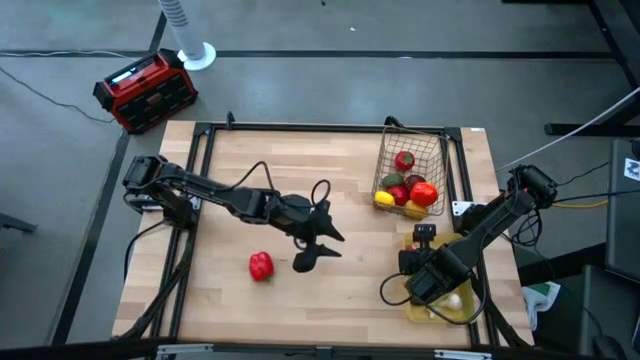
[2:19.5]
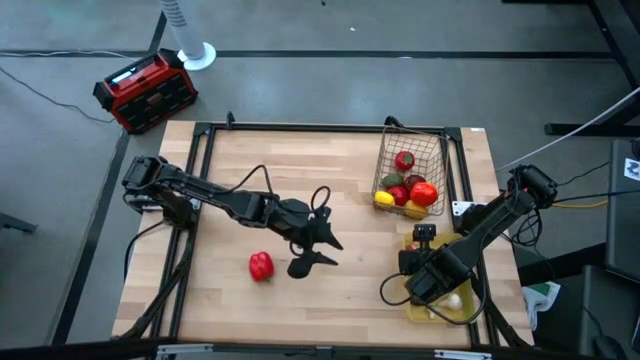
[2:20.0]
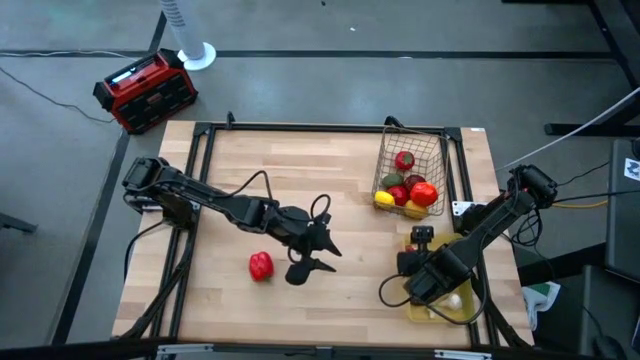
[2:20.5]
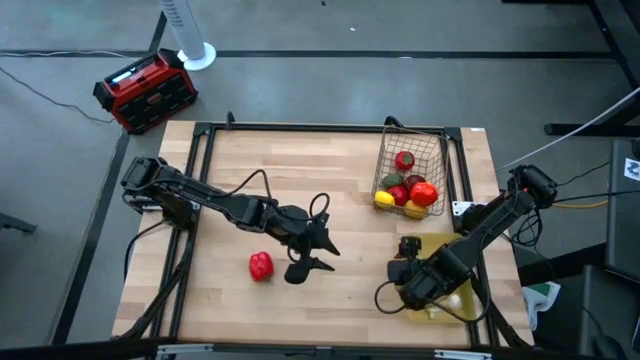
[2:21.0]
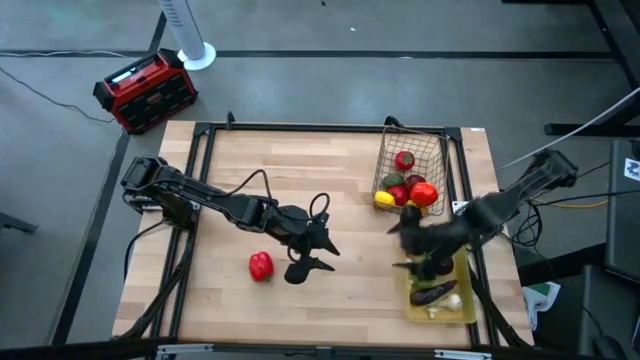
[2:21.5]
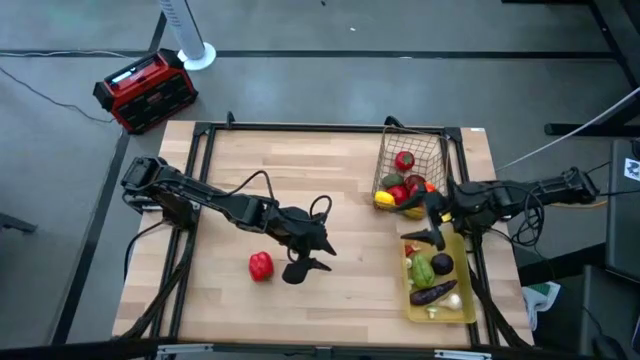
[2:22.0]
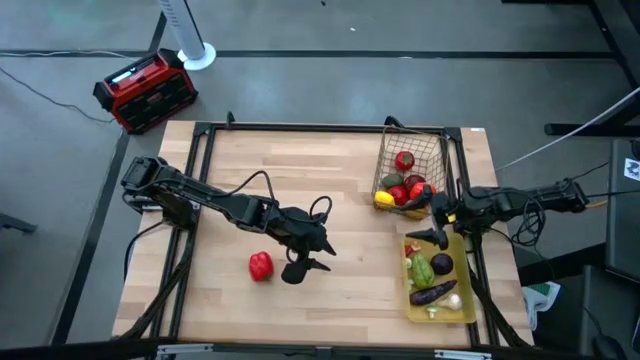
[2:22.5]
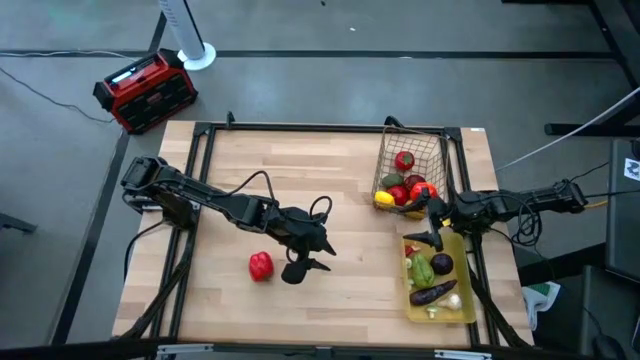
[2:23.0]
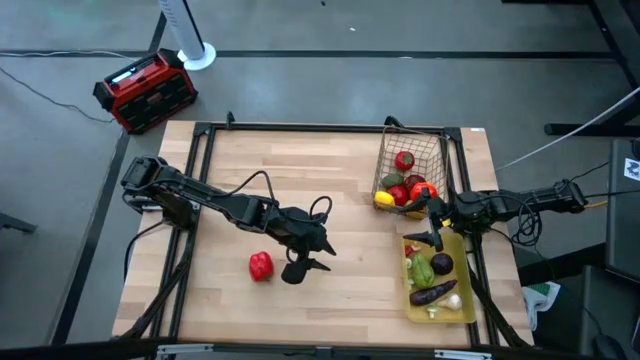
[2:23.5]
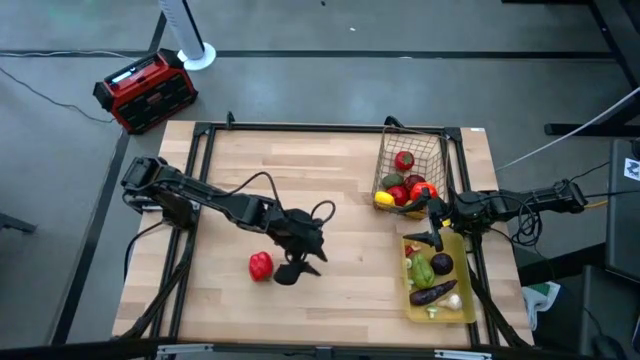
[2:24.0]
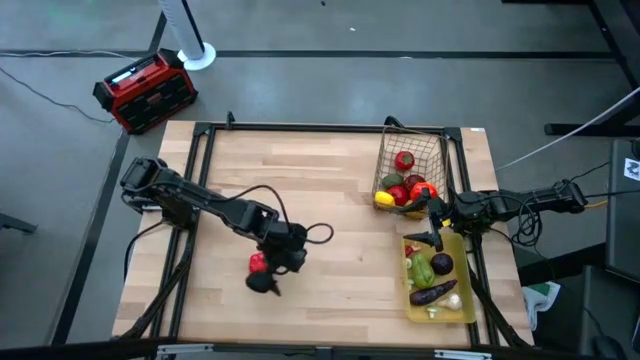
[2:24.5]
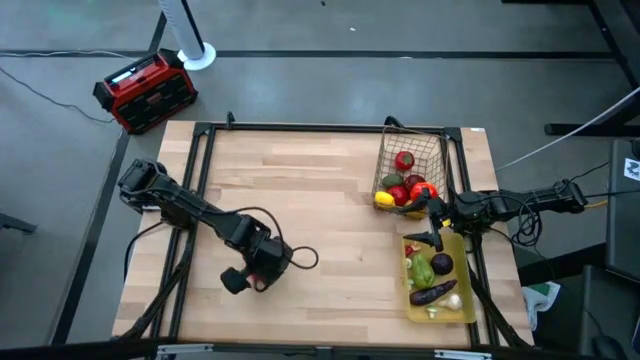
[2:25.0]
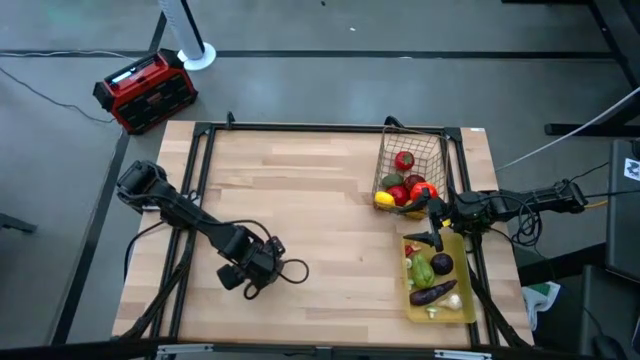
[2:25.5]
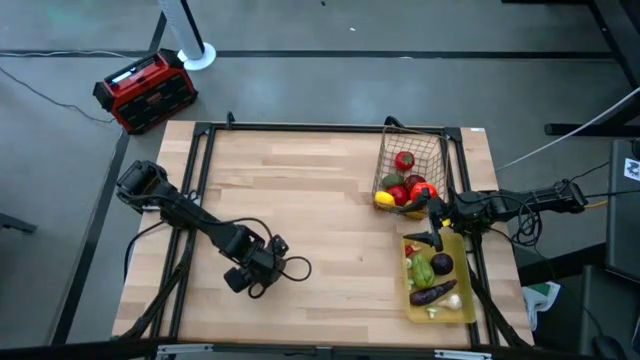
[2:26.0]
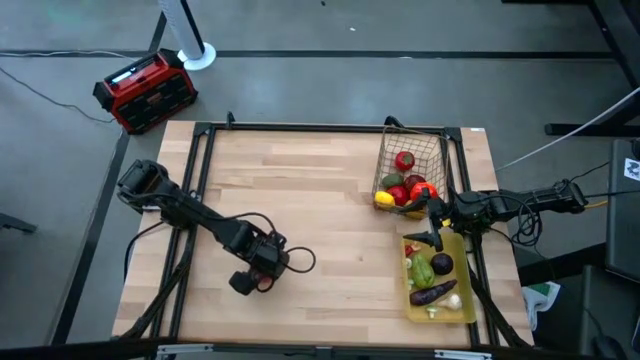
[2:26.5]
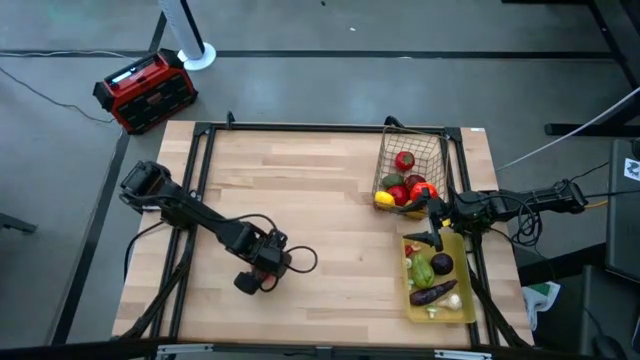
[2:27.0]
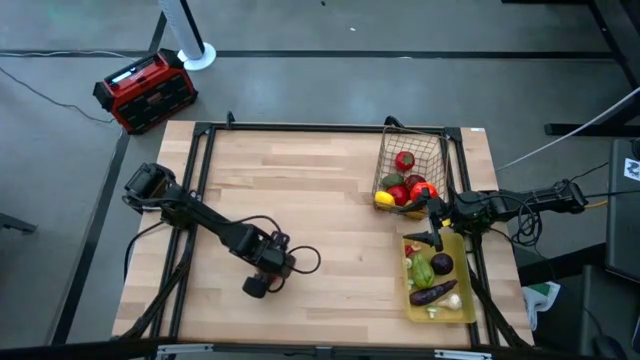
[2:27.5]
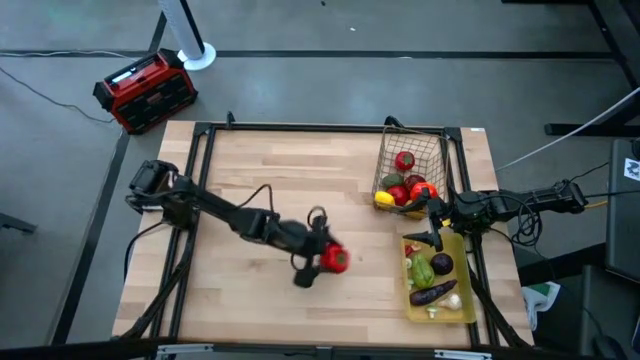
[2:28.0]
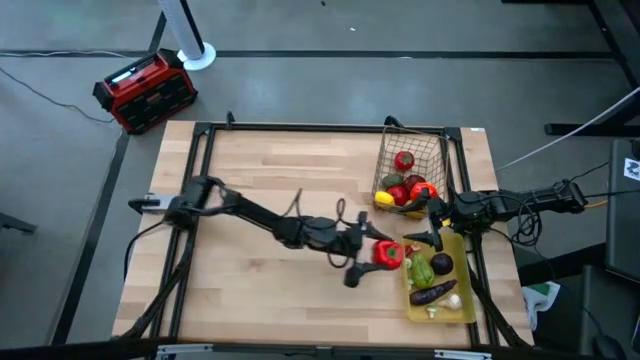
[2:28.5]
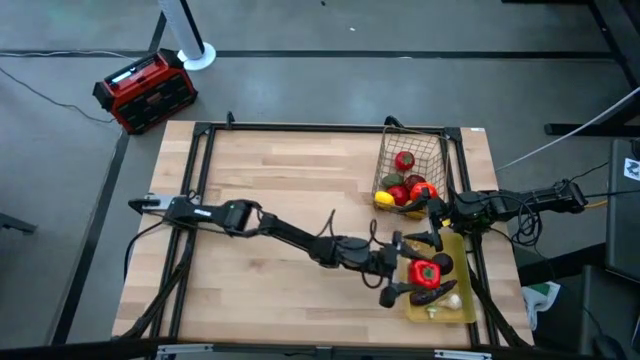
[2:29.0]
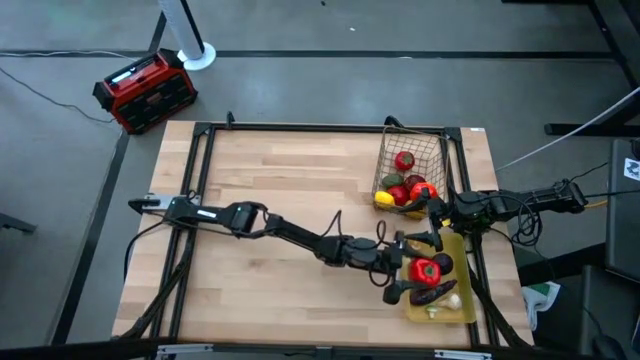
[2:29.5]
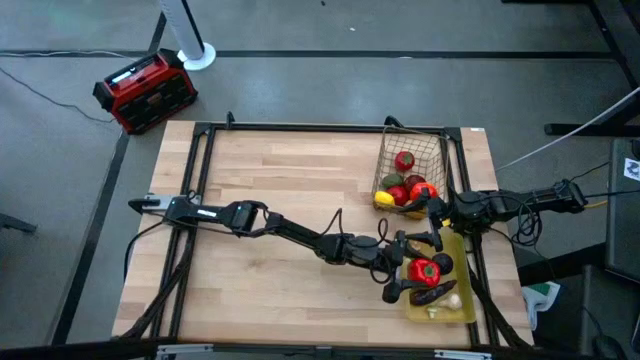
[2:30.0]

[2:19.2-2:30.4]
Task: Sort produce into baskets
Put the red bell pepper into the yellow bin

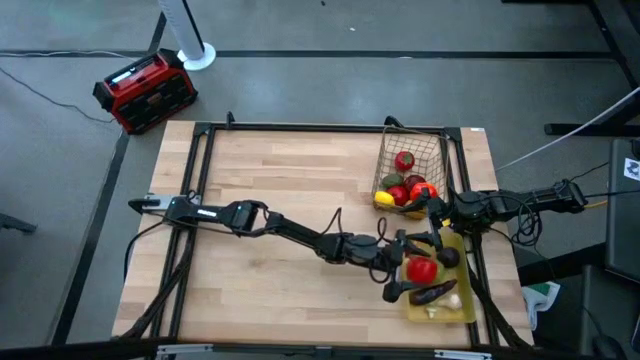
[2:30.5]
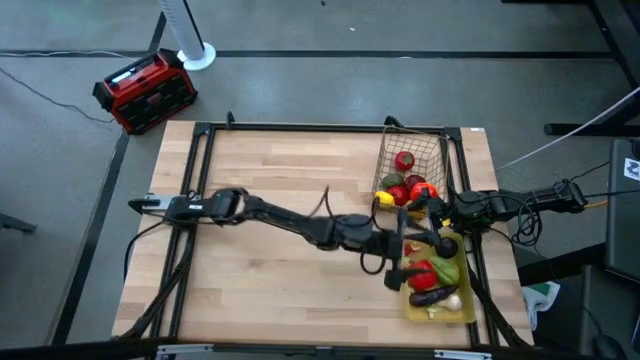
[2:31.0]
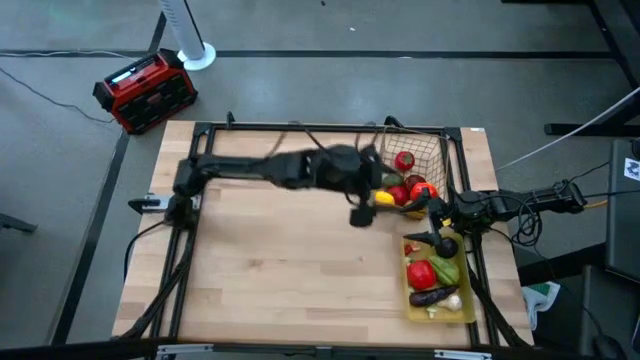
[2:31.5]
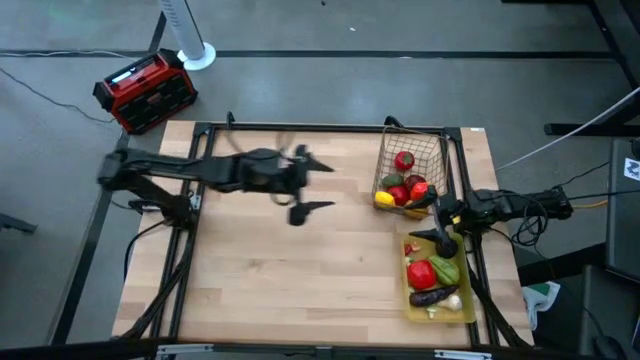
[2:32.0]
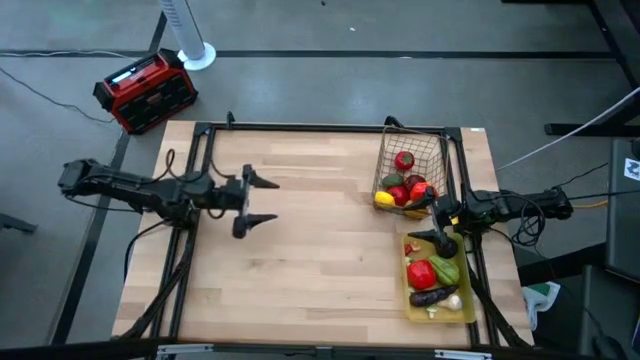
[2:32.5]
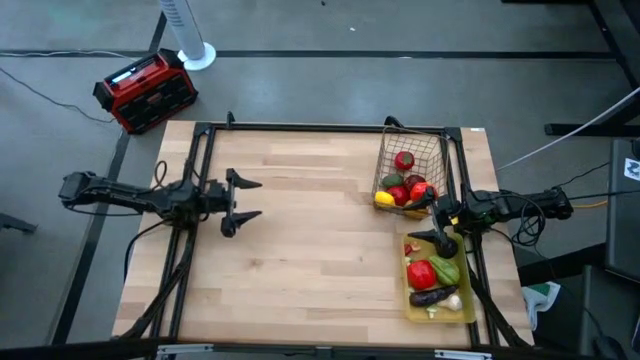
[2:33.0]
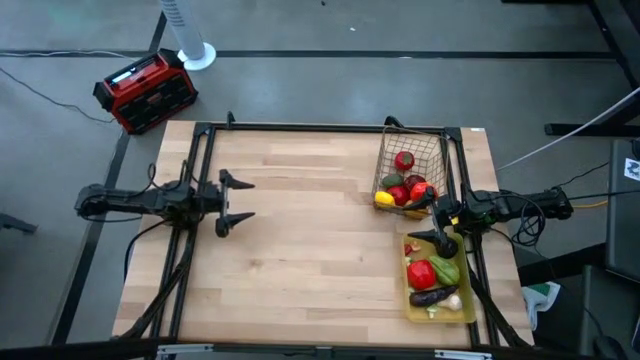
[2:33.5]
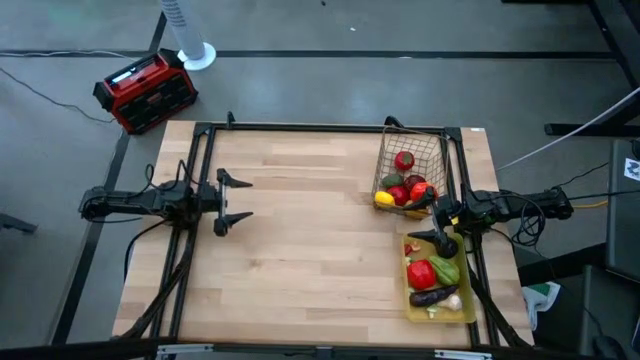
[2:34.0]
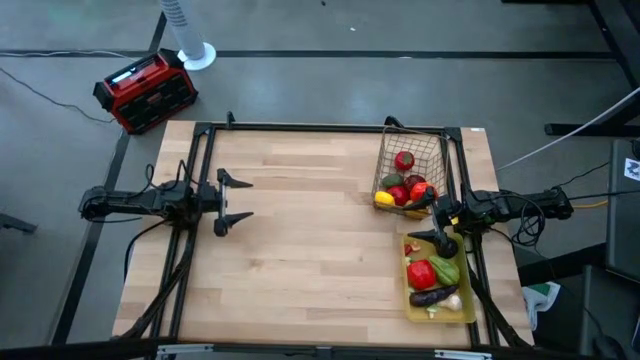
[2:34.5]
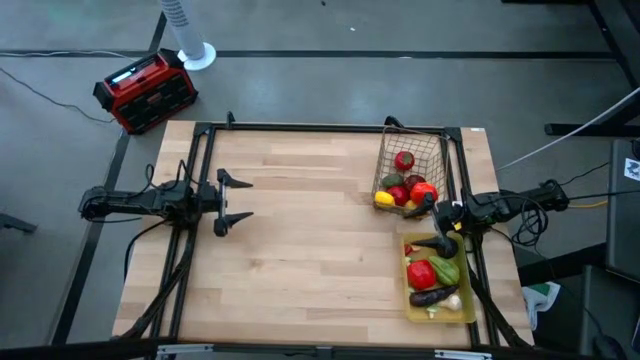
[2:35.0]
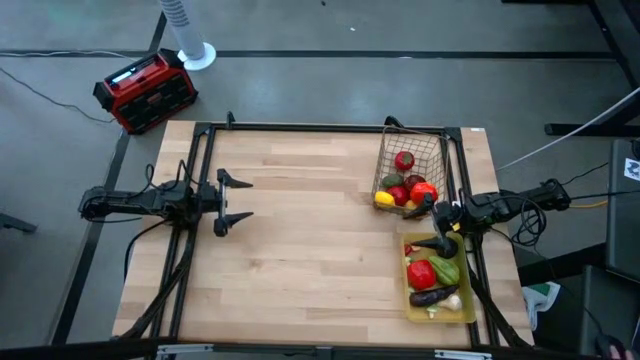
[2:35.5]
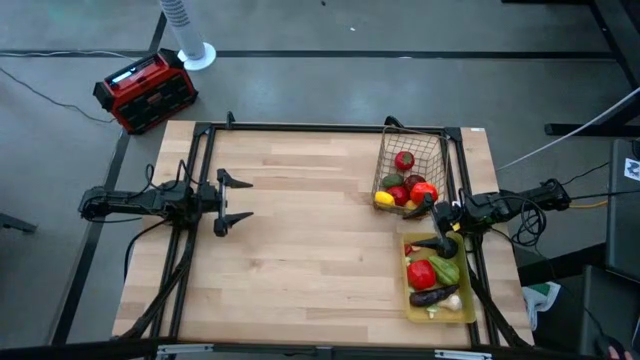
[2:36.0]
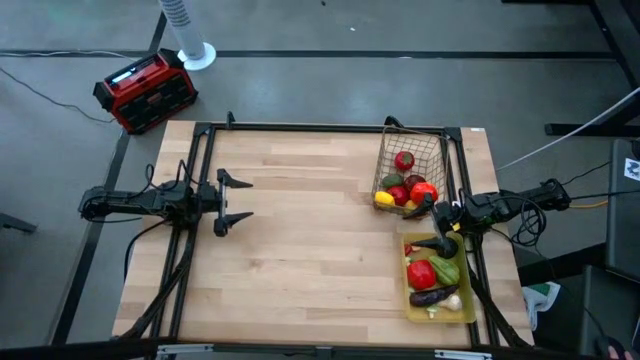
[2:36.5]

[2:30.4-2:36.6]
Return to Home Position

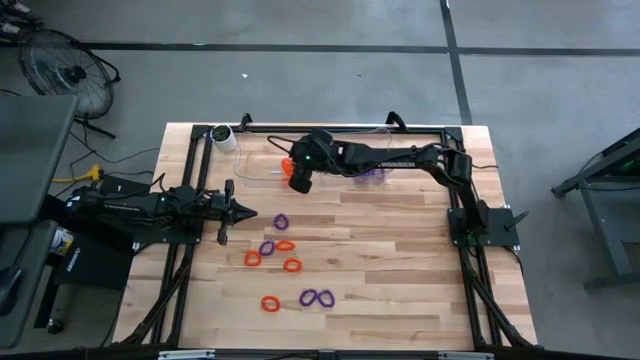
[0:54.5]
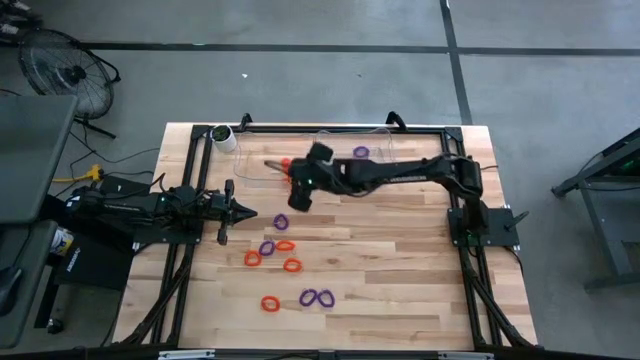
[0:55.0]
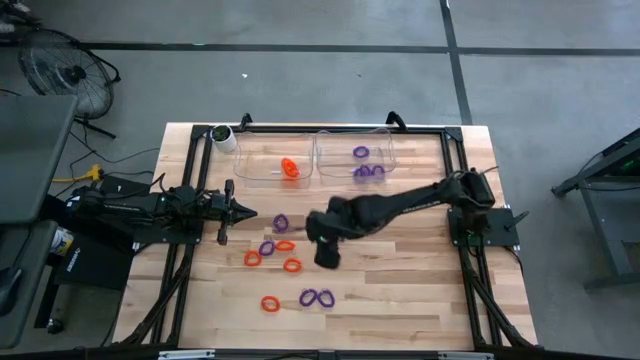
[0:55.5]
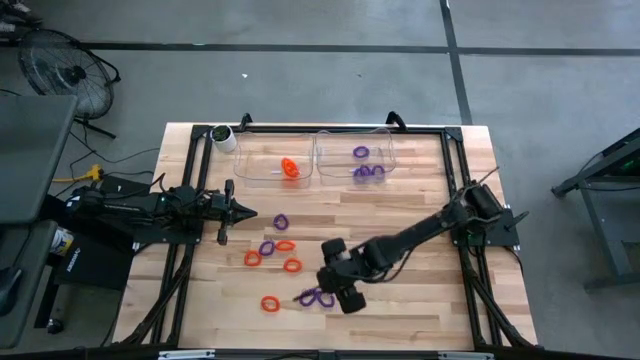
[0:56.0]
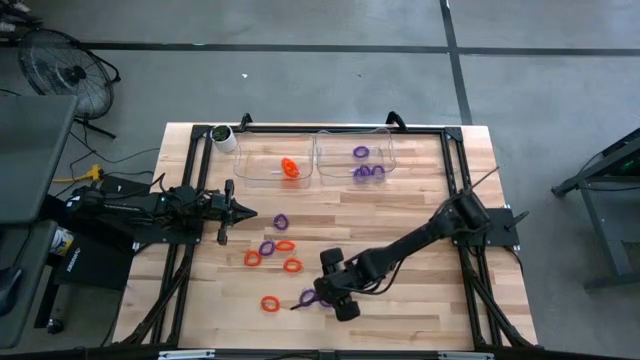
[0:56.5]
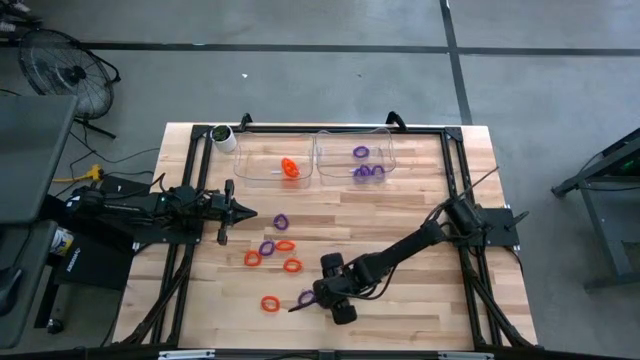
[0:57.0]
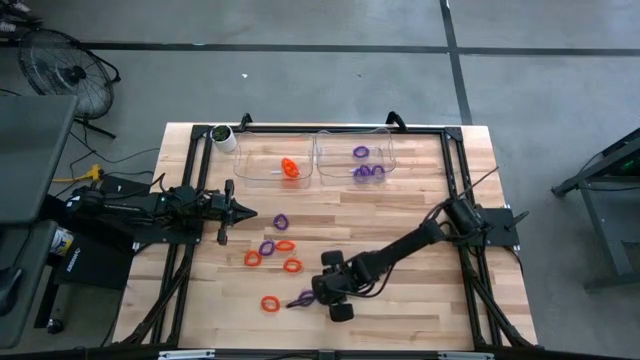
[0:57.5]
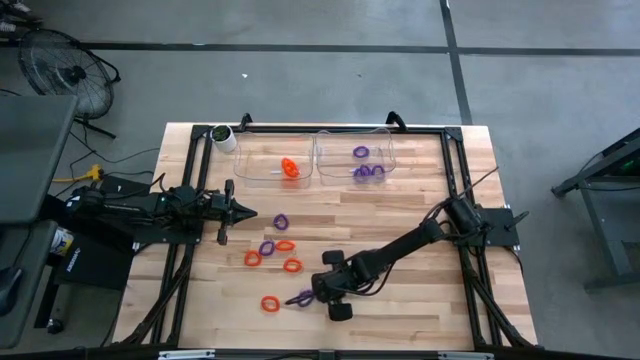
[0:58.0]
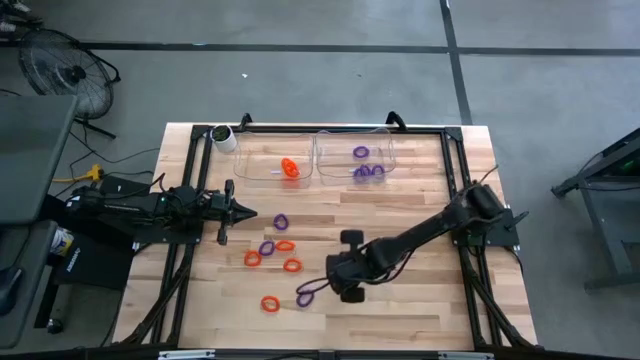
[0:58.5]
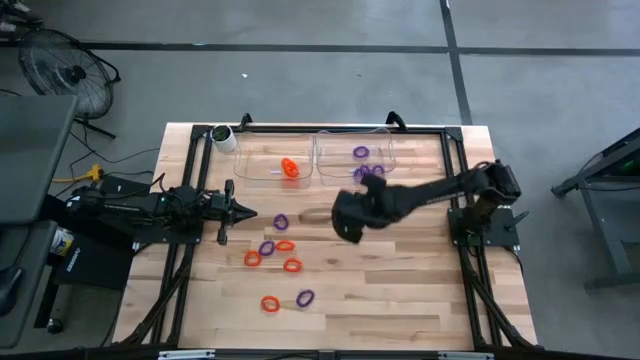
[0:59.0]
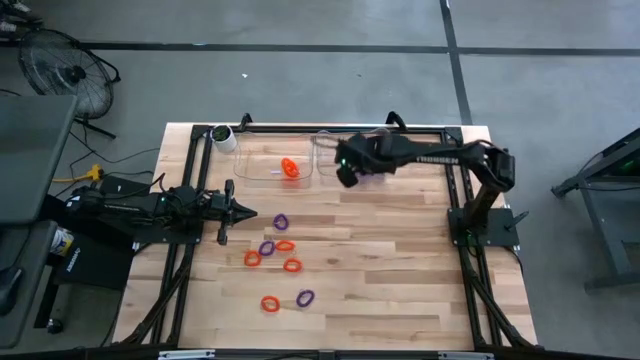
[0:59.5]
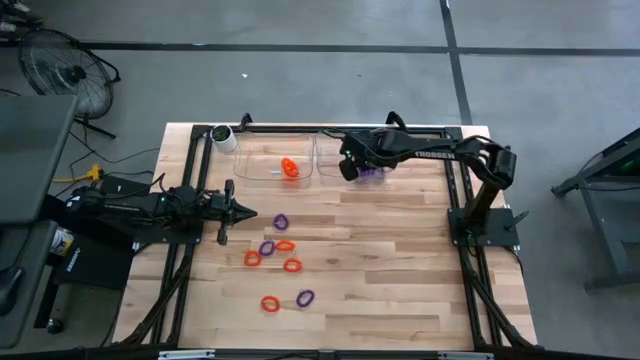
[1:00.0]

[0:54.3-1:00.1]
Task: Sort spring keychains
Put the violet spring keychain into the right bin
